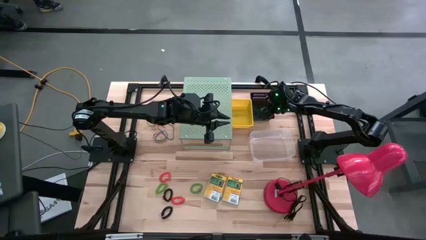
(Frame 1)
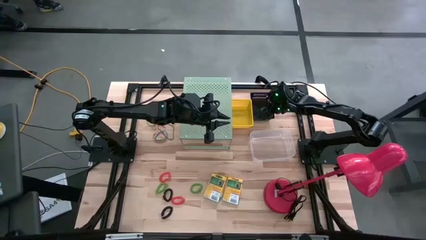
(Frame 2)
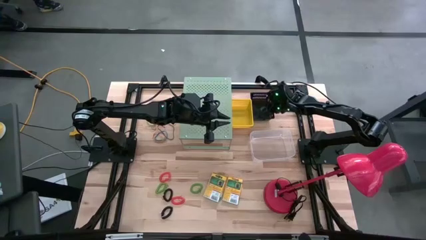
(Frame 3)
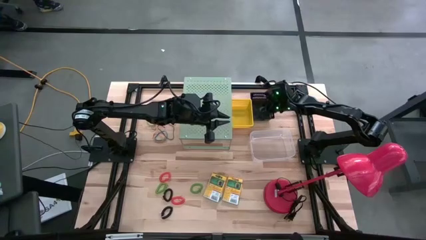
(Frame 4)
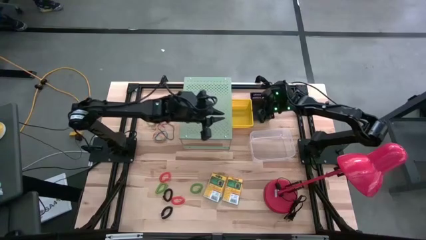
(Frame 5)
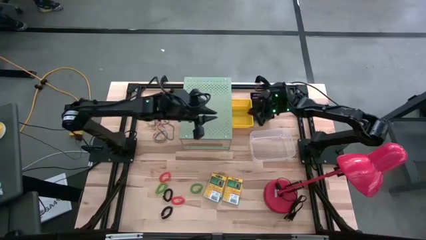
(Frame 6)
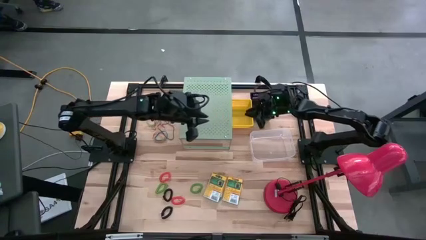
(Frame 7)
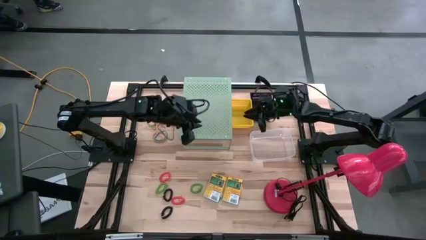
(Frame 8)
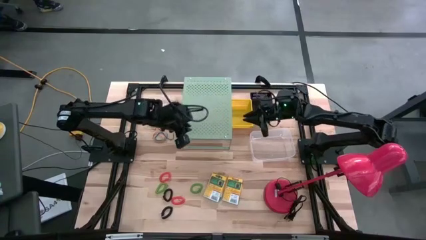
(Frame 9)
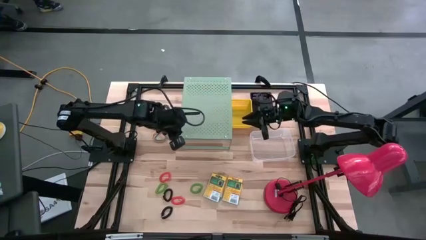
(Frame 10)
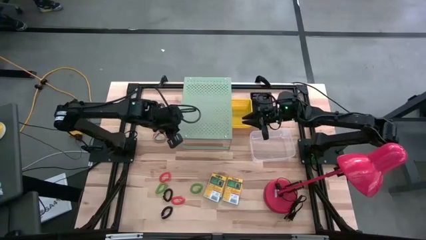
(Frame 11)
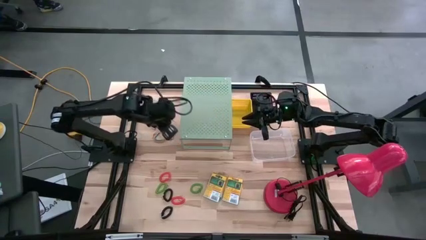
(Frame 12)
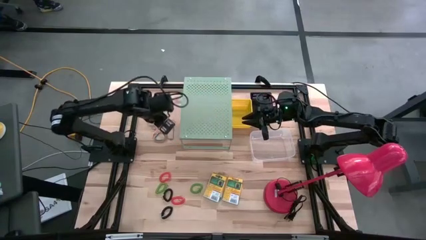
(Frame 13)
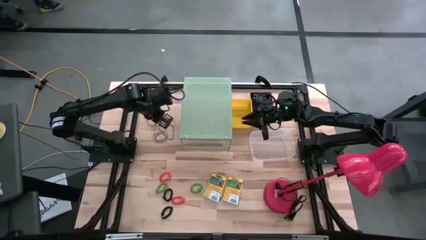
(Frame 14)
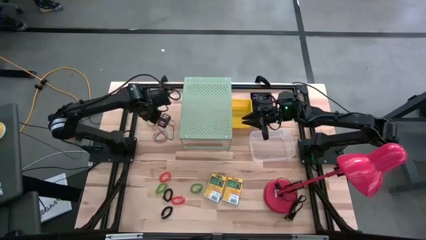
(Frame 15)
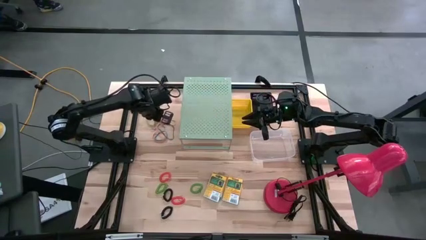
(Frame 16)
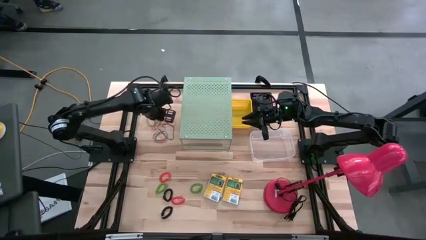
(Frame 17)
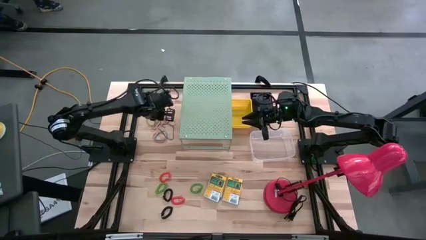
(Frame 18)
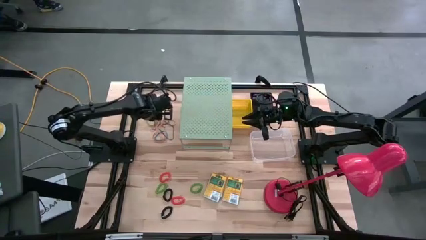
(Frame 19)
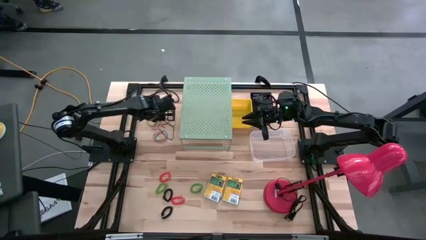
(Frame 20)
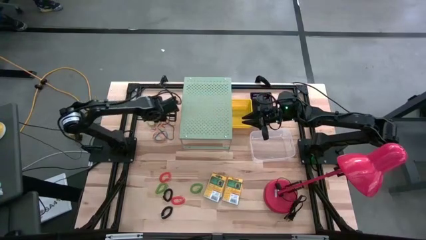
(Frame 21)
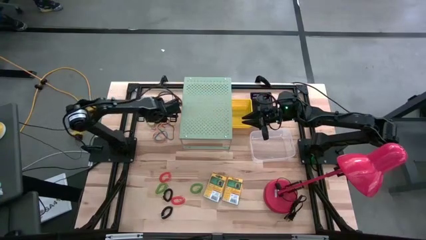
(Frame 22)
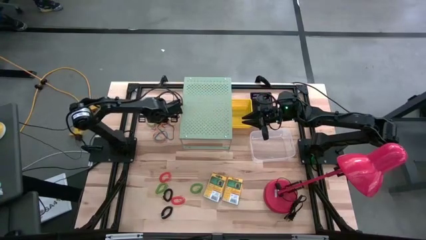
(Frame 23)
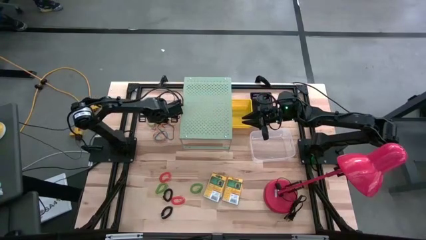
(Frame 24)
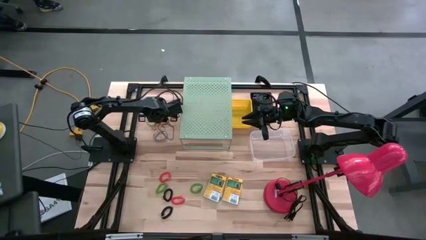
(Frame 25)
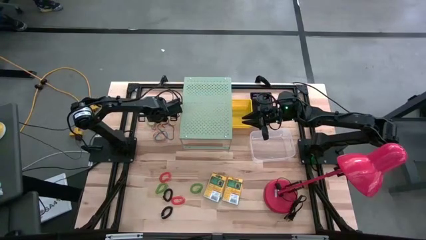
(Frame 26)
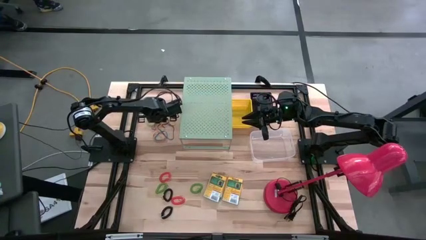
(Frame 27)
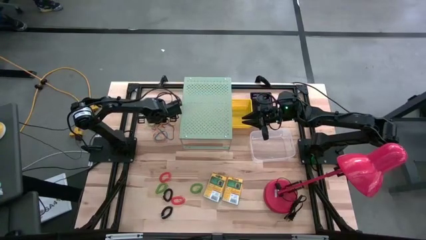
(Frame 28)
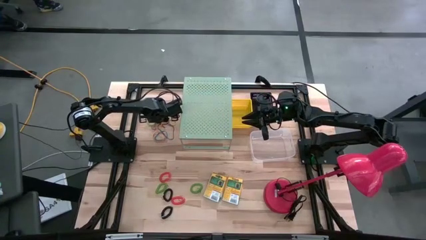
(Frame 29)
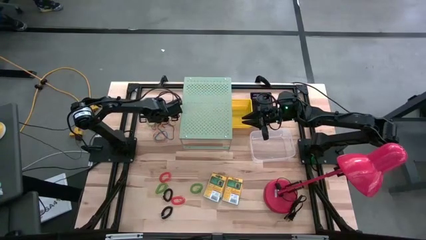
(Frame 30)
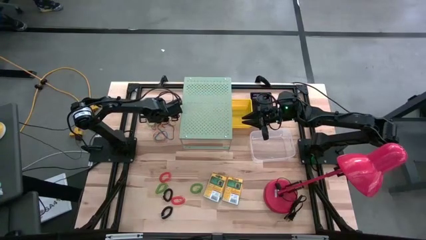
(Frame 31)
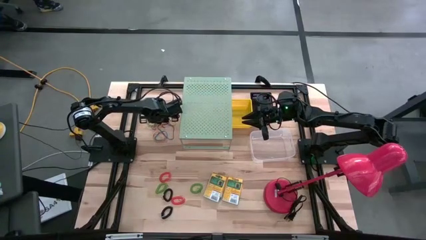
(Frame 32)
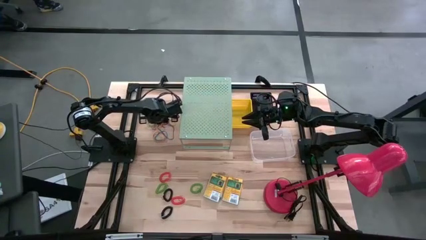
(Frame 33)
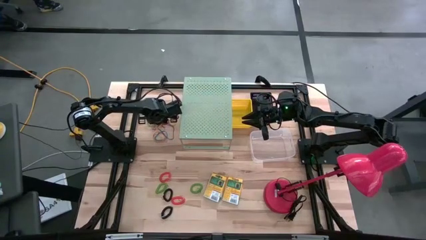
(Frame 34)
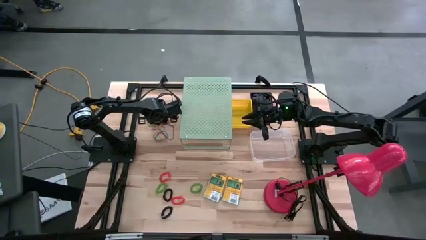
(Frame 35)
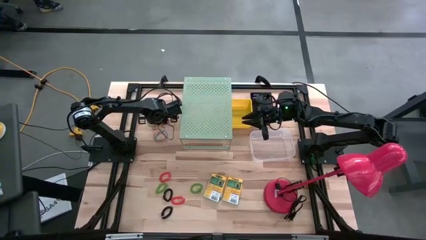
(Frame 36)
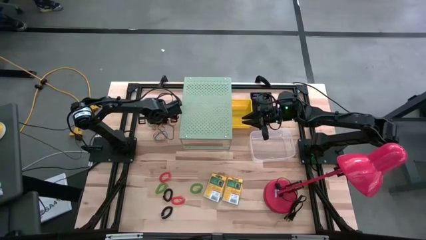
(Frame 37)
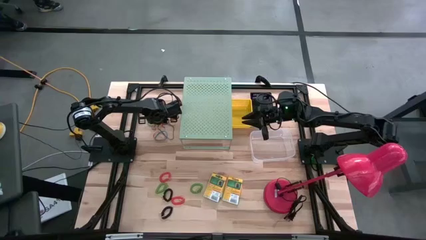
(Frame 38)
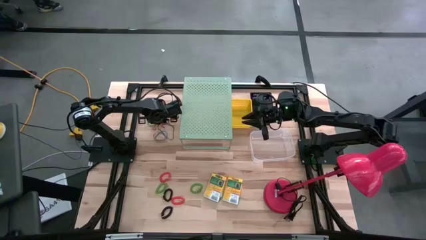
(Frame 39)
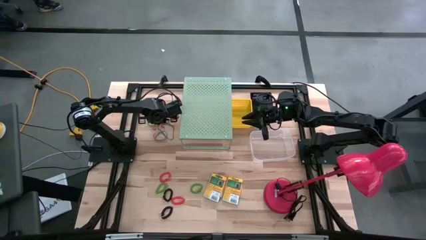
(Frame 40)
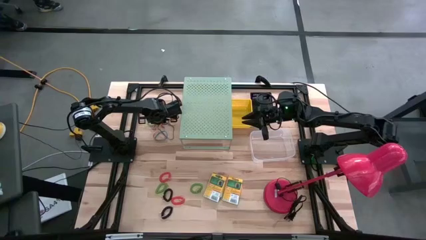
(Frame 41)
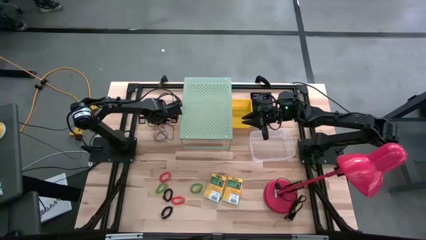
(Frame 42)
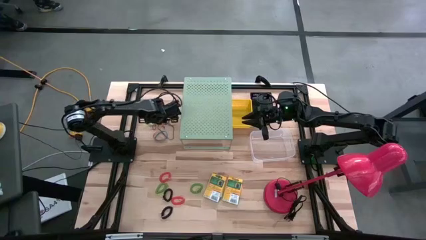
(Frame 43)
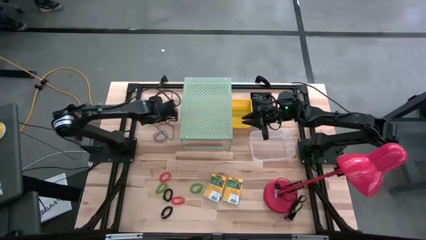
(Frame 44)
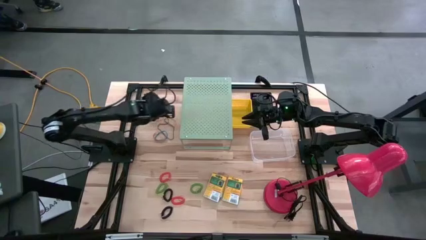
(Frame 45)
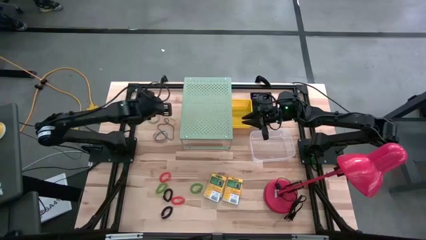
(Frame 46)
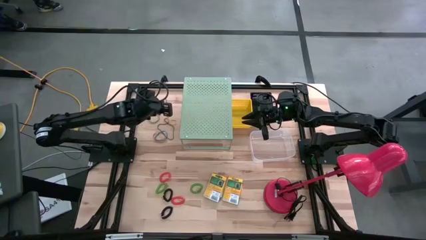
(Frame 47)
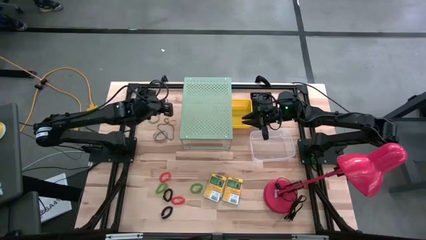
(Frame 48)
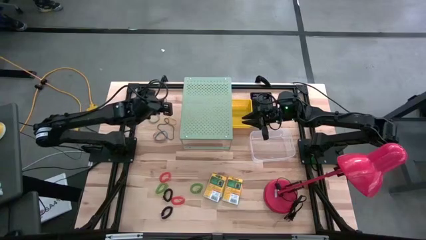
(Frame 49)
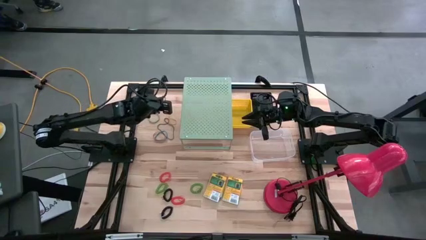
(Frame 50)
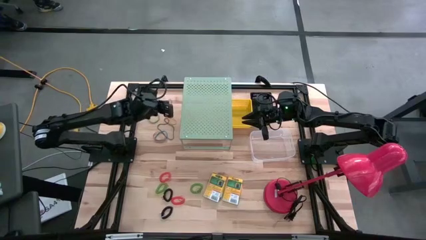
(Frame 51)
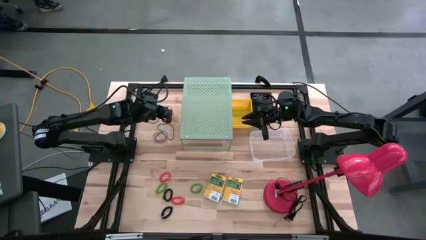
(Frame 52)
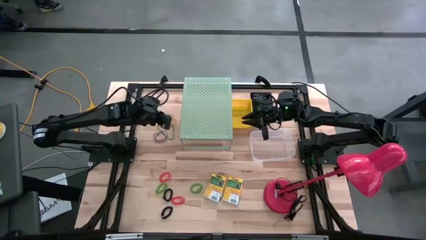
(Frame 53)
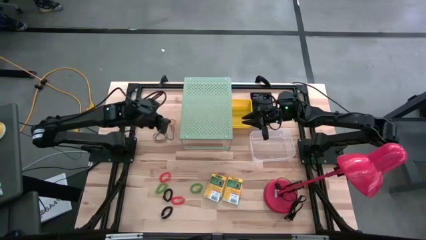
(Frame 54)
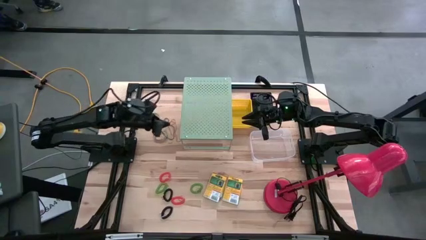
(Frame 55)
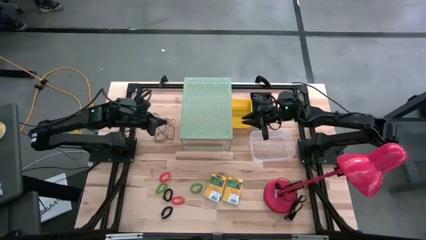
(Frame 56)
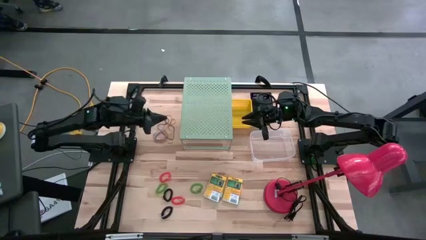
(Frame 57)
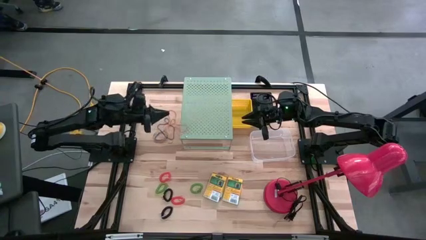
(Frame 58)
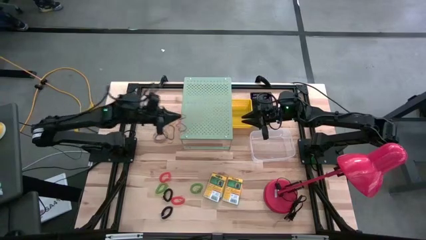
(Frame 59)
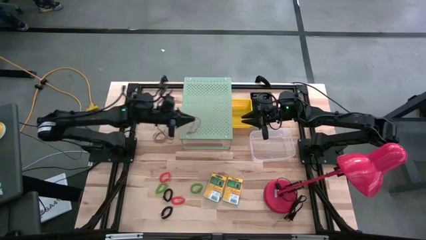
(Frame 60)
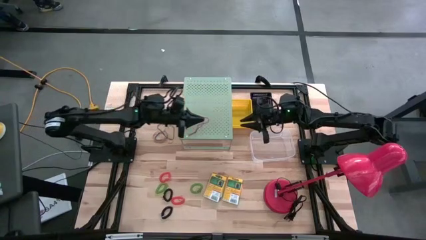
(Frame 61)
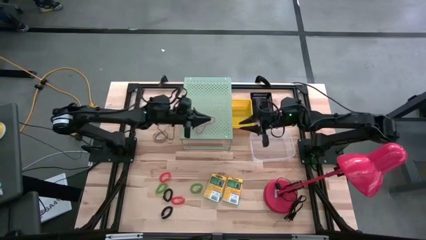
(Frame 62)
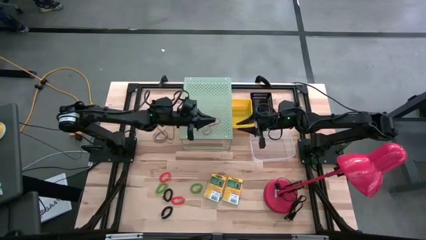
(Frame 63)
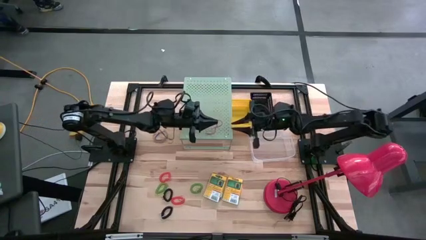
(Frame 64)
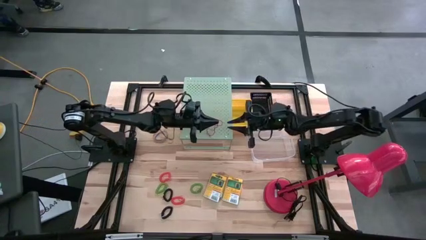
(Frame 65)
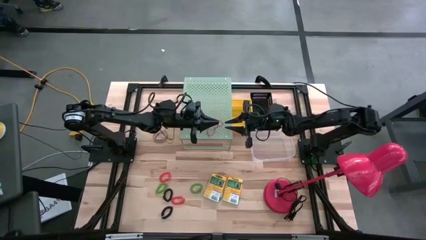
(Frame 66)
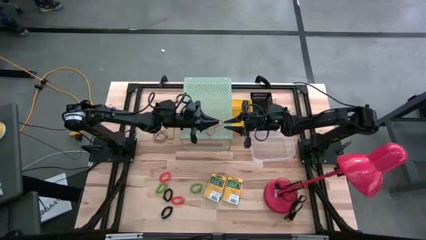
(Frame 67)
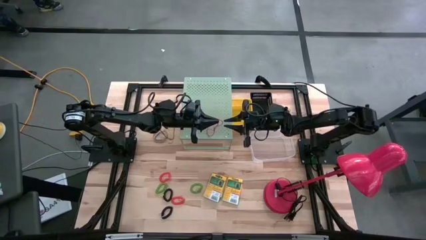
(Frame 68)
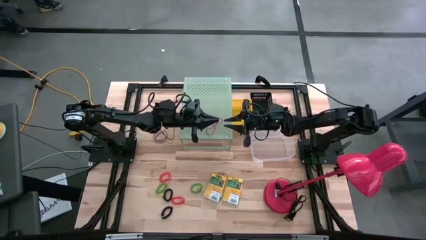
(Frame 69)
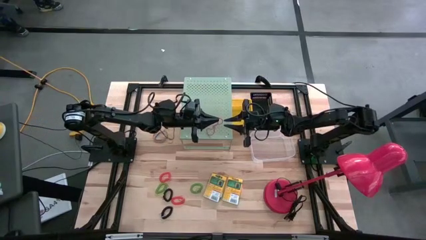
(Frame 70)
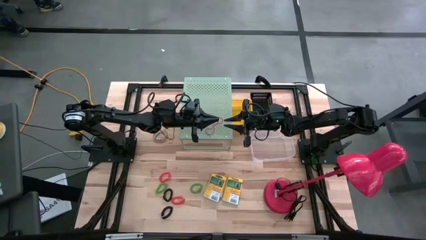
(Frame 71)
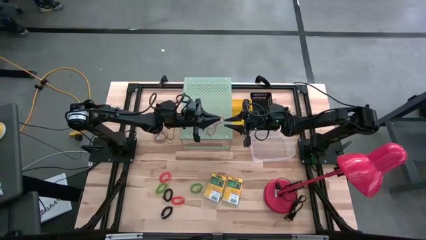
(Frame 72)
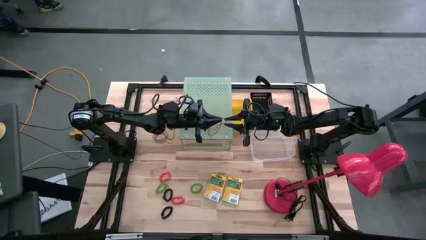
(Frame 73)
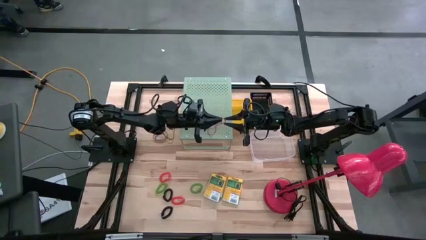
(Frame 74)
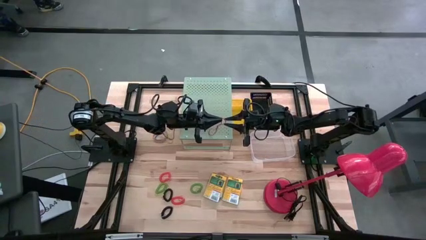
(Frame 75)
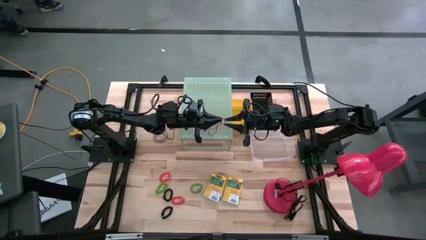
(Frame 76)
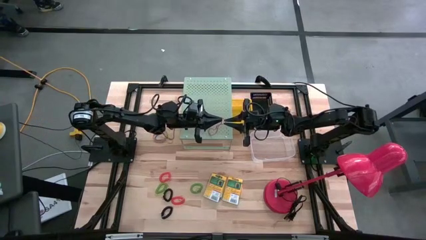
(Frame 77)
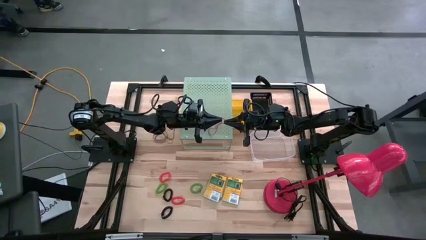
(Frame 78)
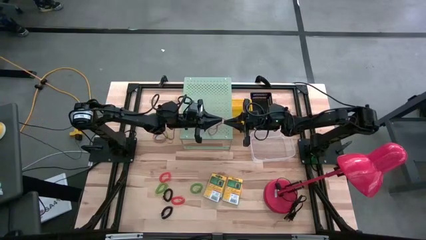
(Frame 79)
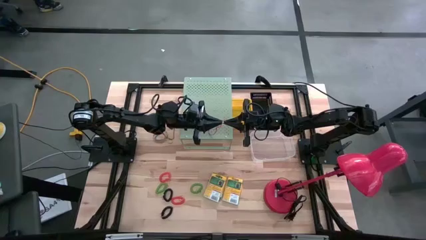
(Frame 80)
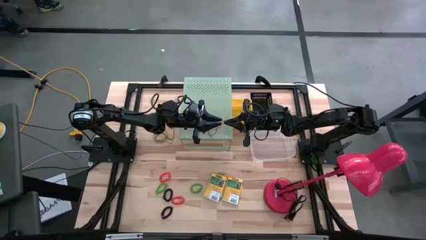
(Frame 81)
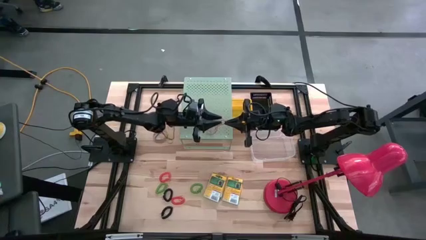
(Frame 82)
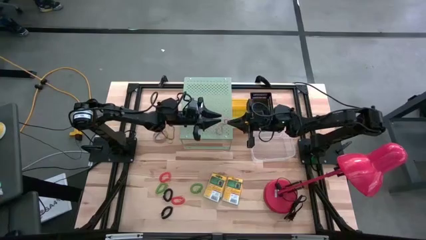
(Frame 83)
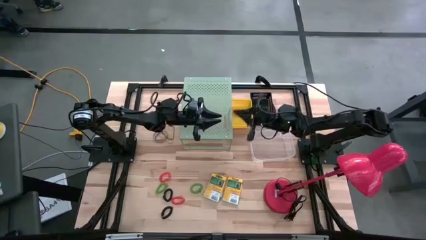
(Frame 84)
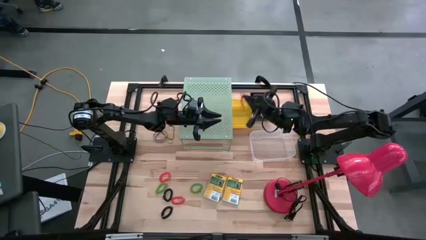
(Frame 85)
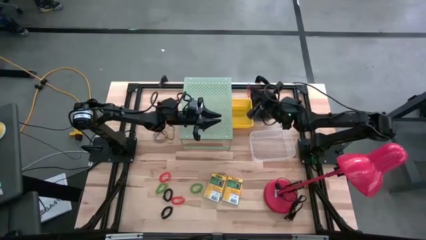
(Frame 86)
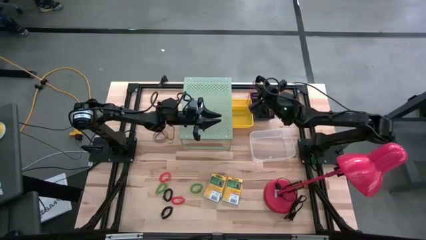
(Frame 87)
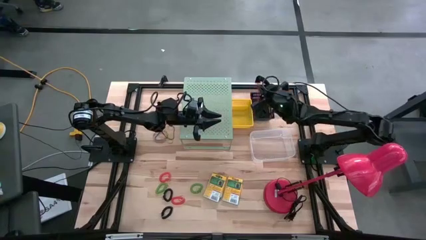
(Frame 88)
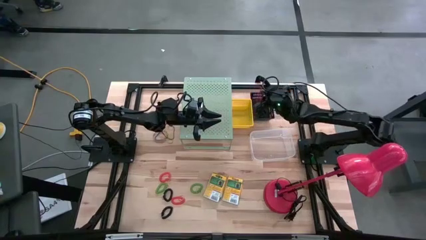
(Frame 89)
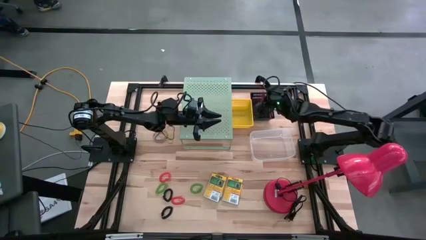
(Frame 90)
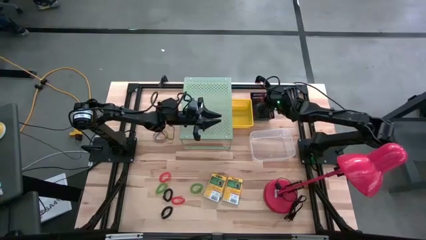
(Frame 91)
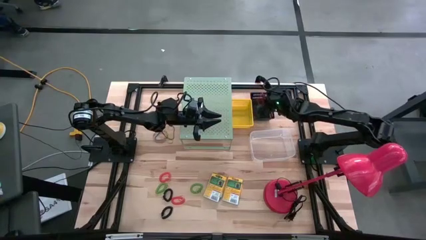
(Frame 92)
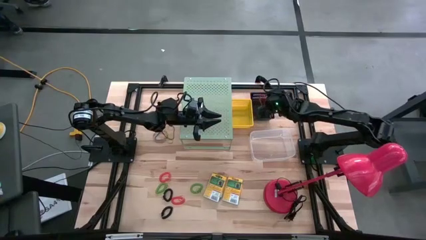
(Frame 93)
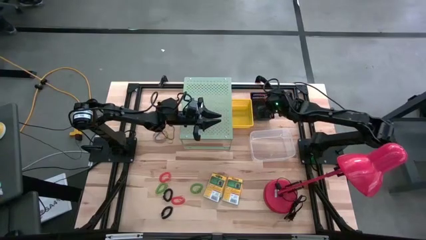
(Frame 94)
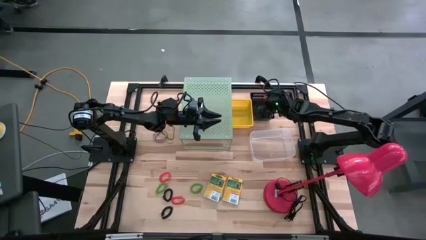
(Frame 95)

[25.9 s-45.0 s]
Task: Pick & Place Office Desk Supplies
Put the red rubber band into the black bin
